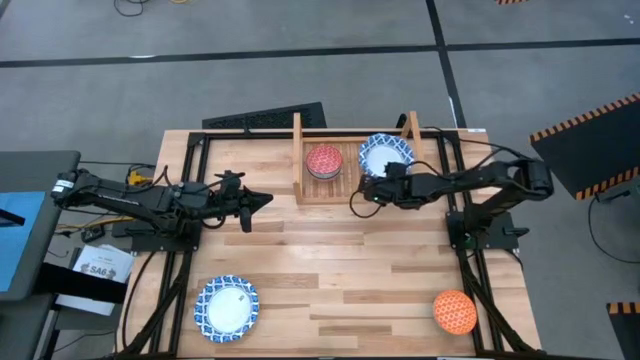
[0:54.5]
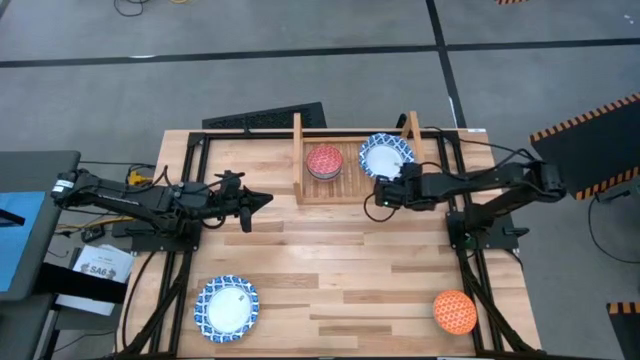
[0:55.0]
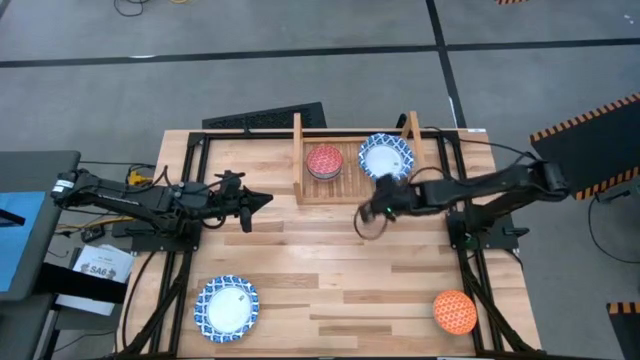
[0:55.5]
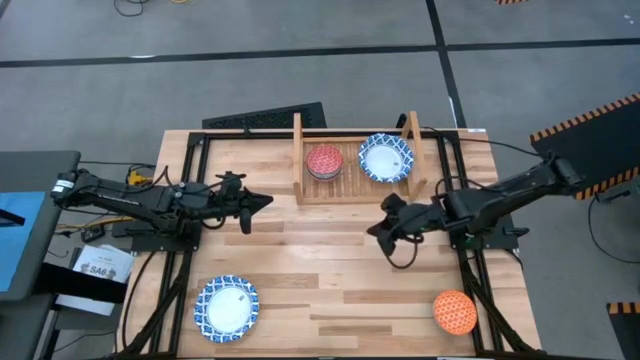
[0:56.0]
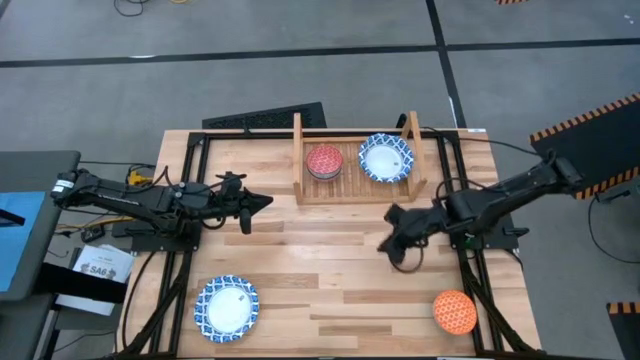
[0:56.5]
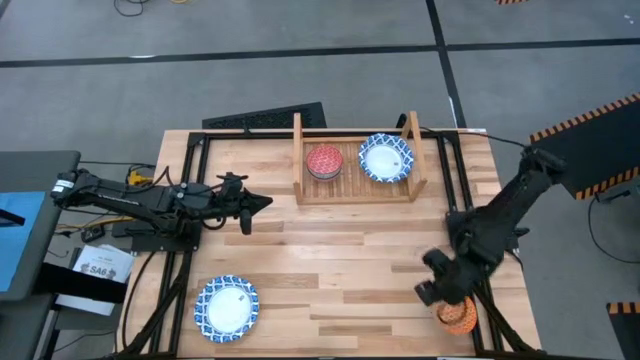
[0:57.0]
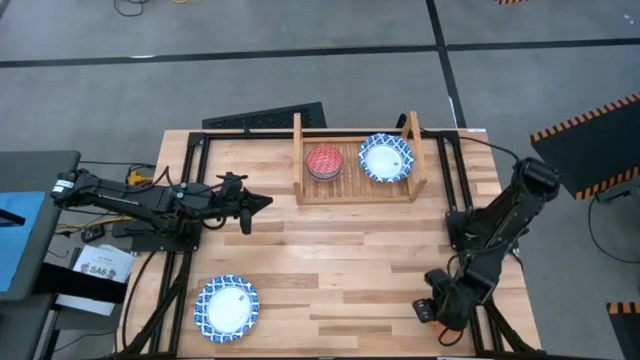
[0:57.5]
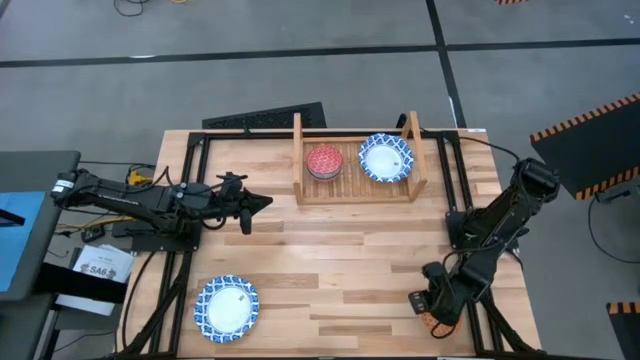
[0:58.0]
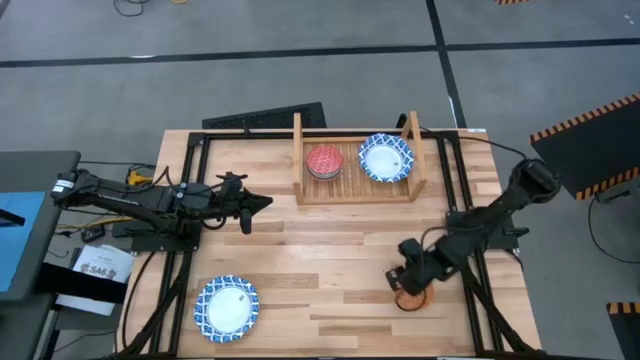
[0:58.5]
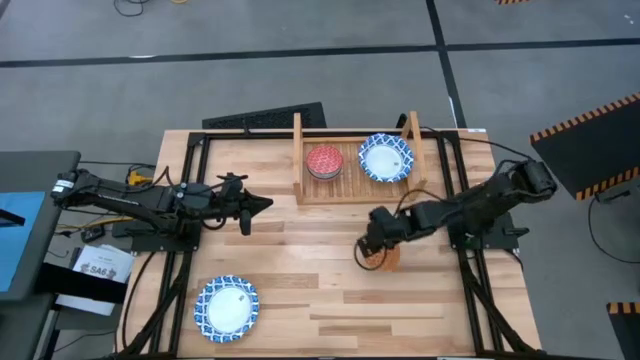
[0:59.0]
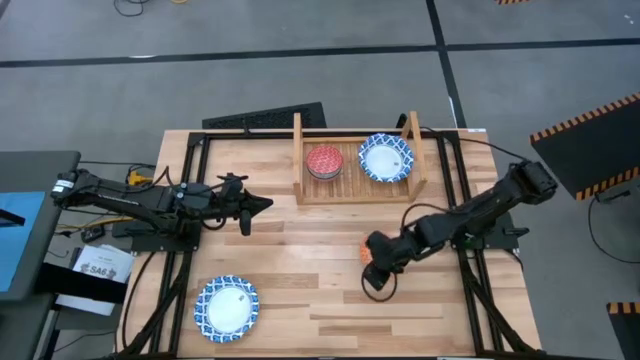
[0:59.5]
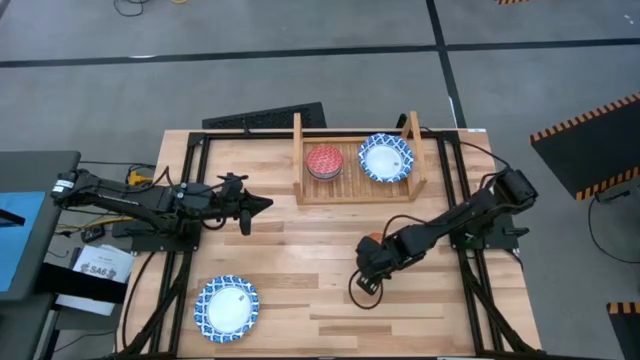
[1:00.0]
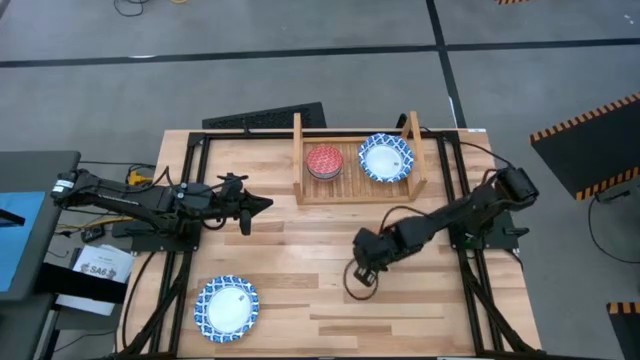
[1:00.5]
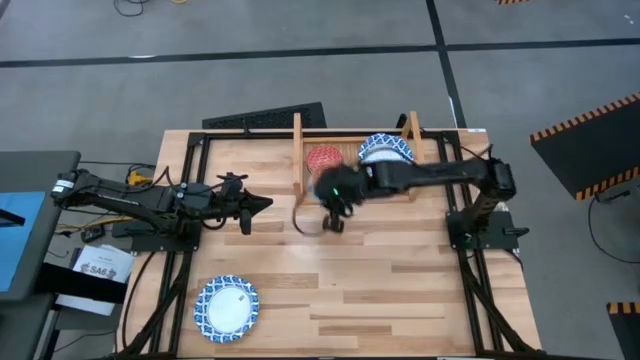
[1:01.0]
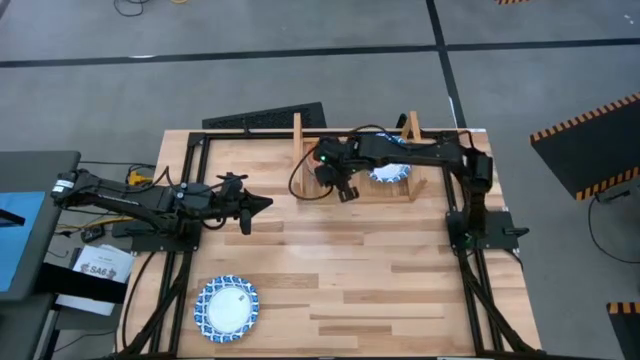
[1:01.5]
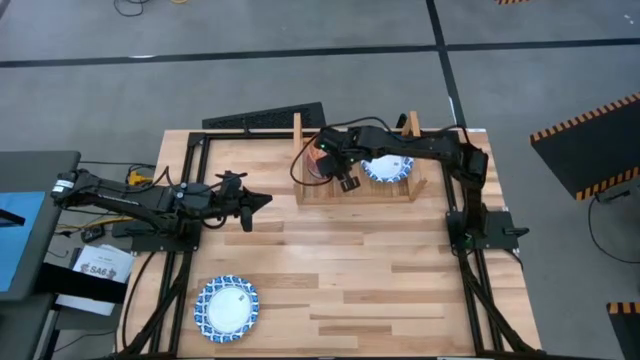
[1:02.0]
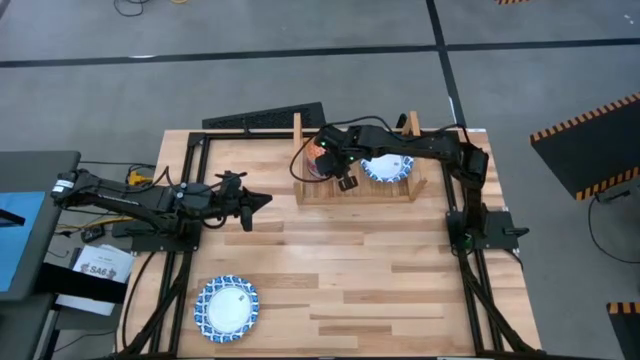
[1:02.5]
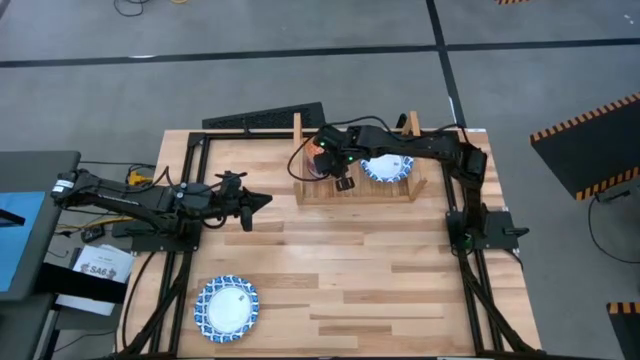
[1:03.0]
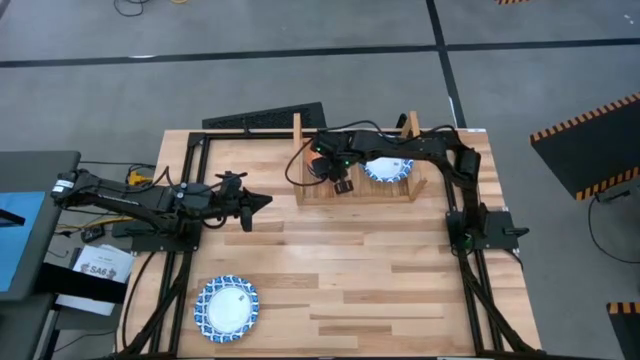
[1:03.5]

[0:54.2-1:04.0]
Task: Place and stack bowls onto a shelf
Stack the orange small bowl into the red small bowl on the shelf

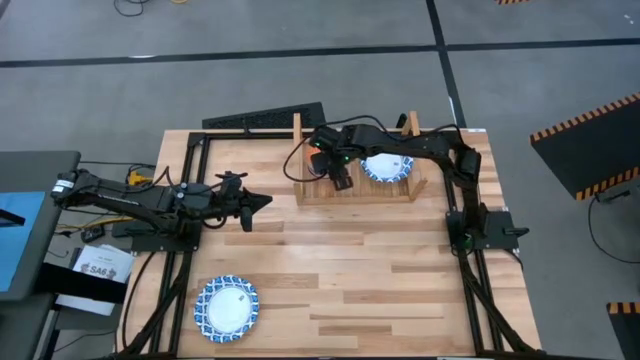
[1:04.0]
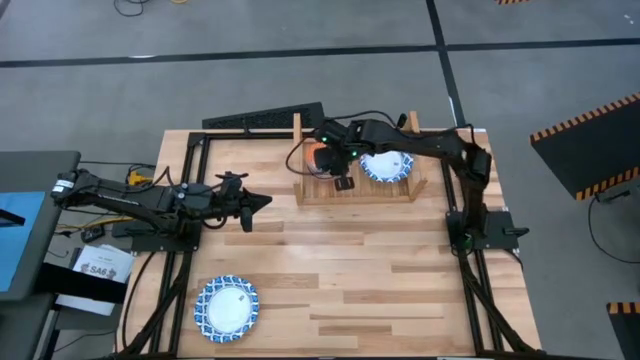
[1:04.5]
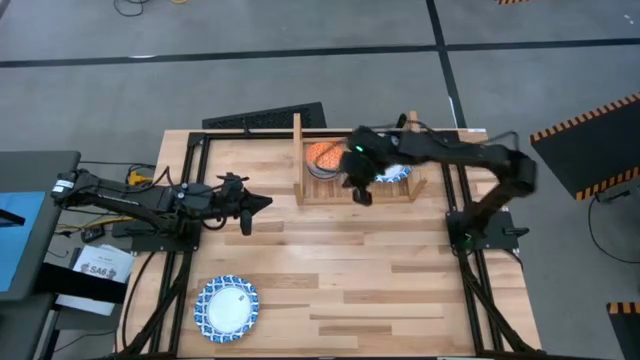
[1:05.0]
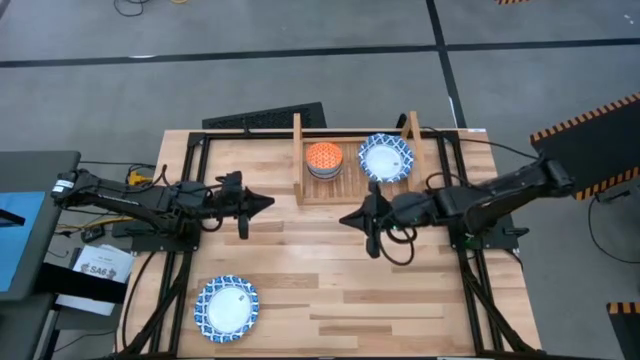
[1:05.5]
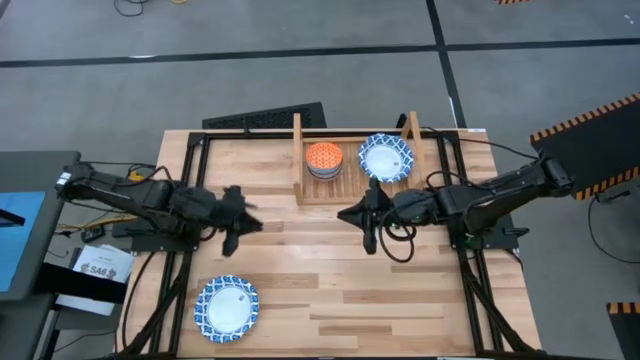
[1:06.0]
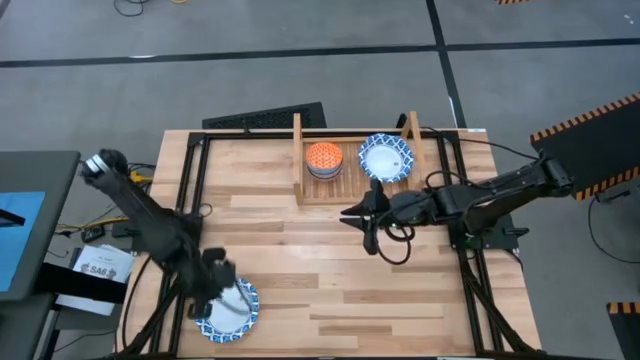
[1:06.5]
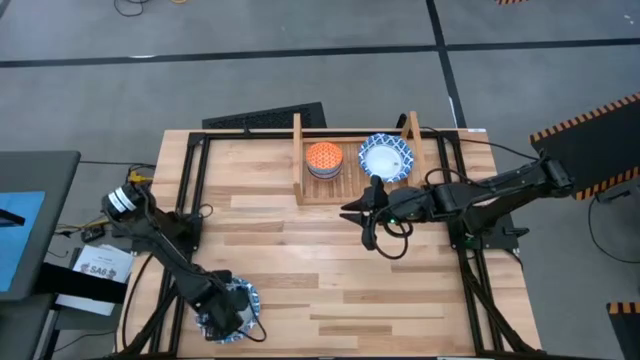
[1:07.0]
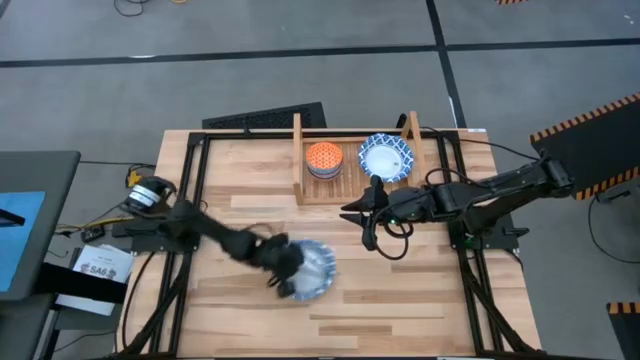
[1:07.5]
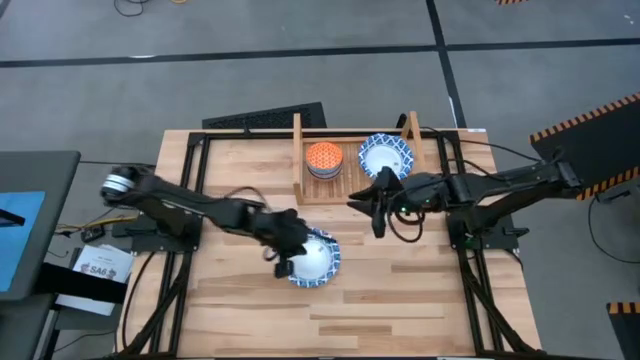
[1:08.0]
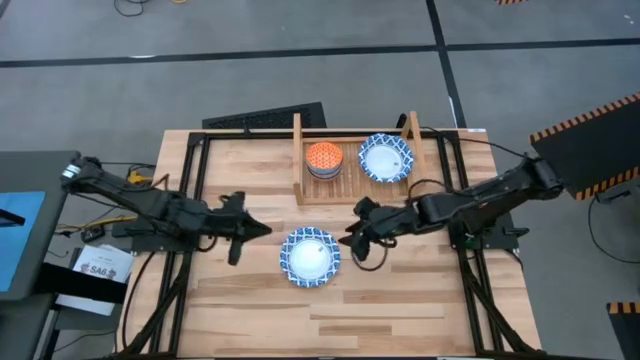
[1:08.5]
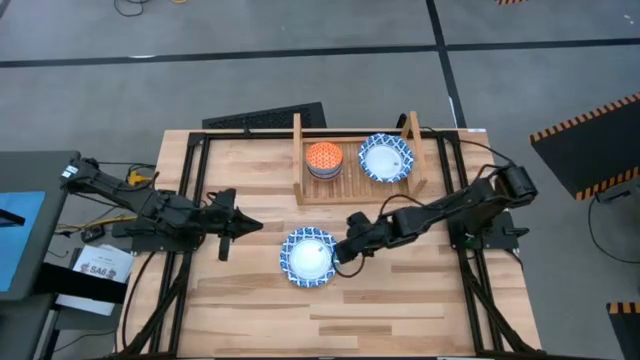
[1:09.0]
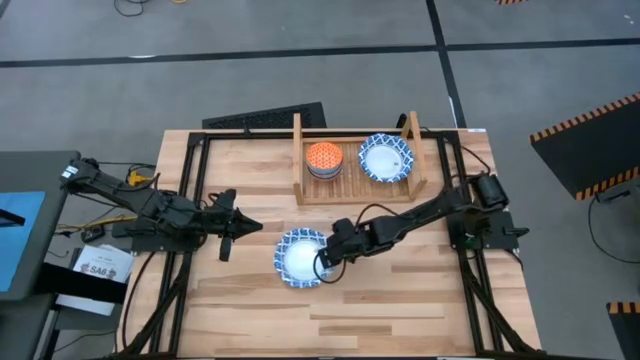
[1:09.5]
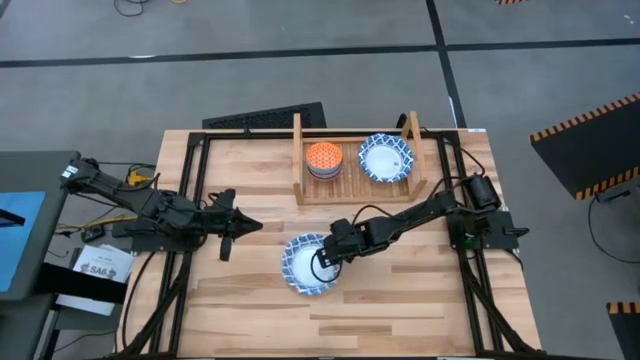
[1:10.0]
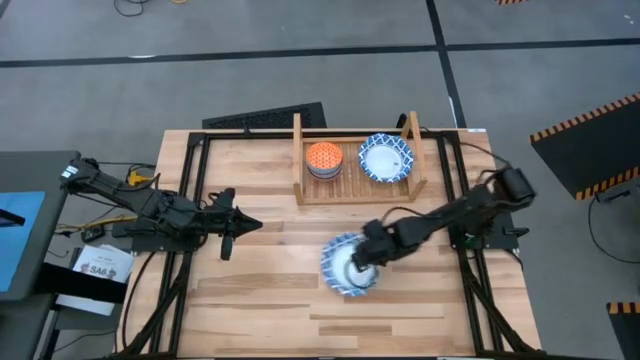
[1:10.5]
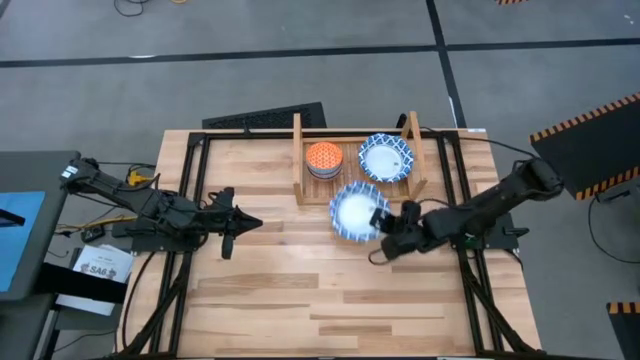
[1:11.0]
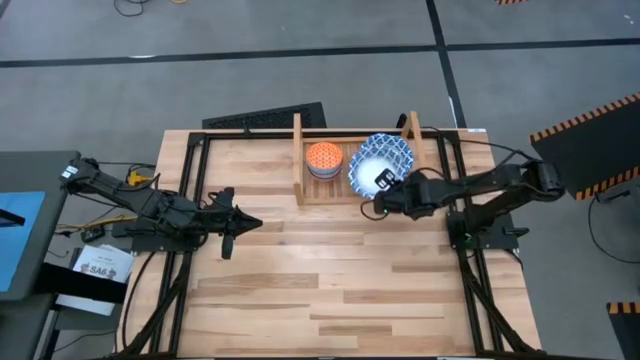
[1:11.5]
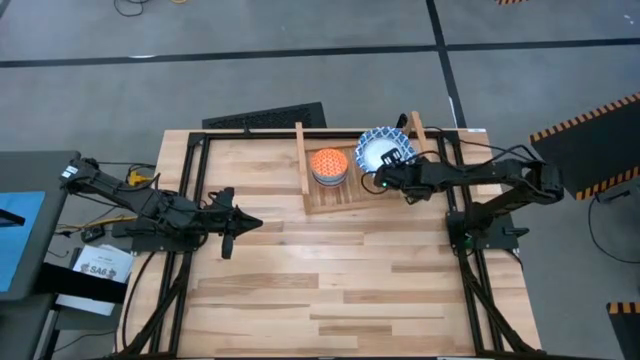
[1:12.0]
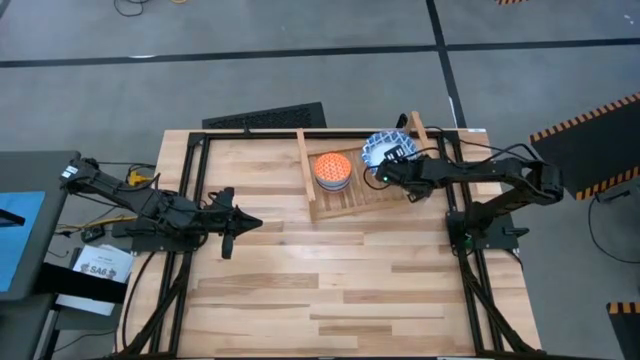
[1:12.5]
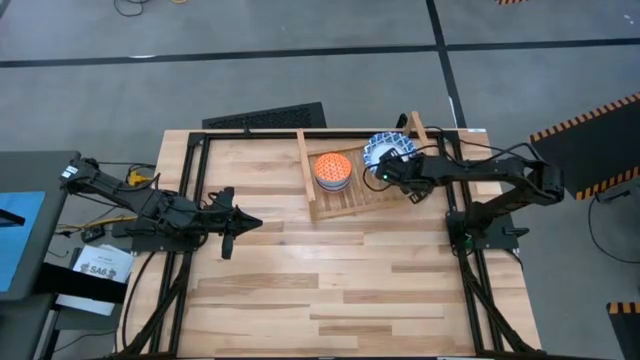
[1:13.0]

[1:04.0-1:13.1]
Stack the blue pattern large bowl into the blue pattern large bowl on the shelf

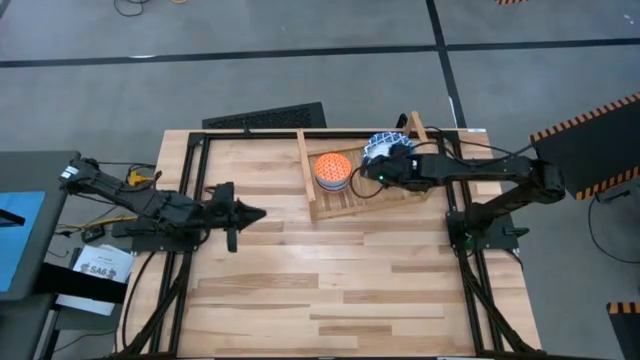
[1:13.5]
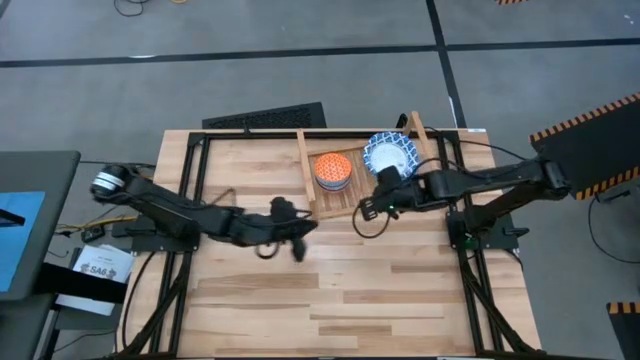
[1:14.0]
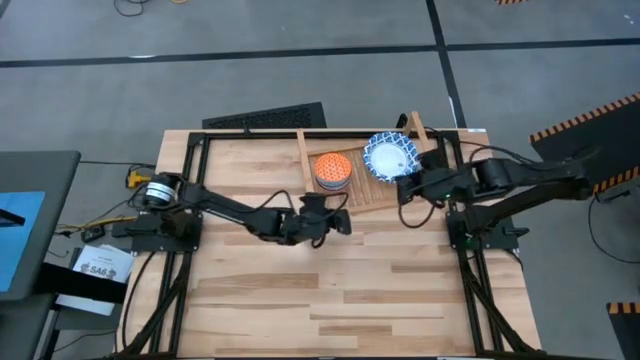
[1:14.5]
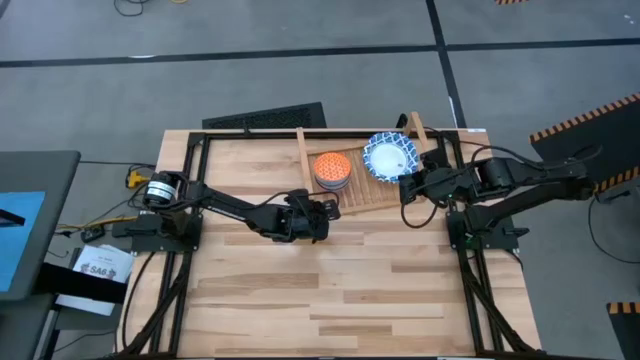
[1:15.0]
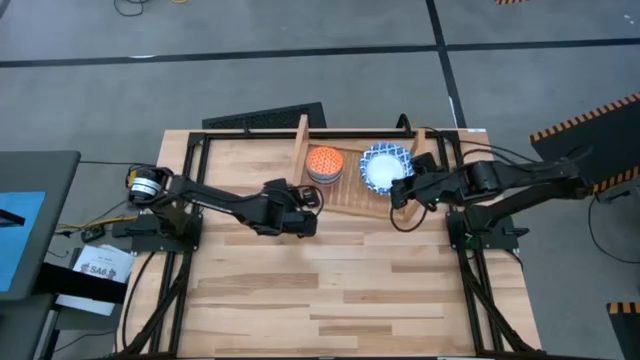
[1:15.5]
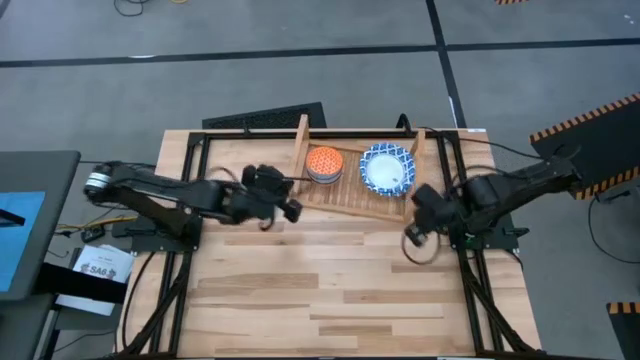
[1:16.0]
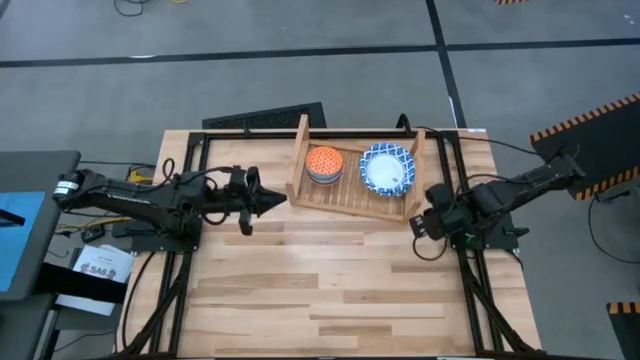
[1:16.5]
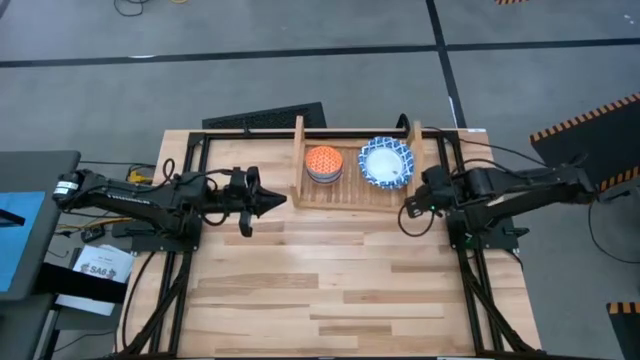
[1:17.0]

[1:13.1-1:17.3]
Adjust the shelf
